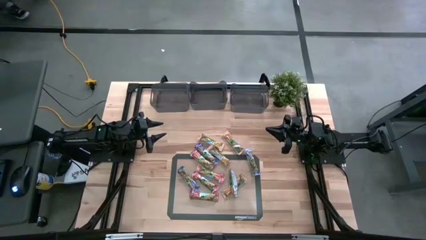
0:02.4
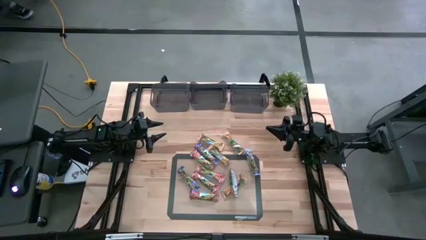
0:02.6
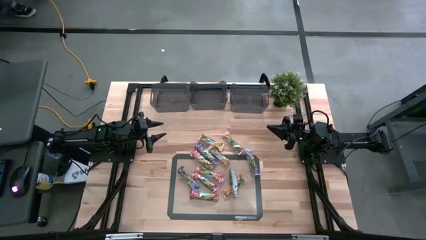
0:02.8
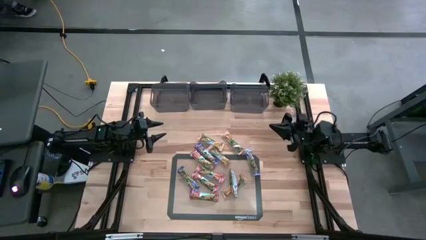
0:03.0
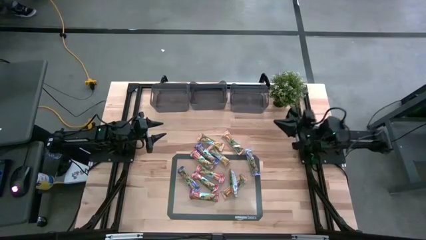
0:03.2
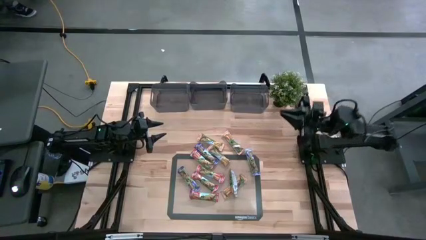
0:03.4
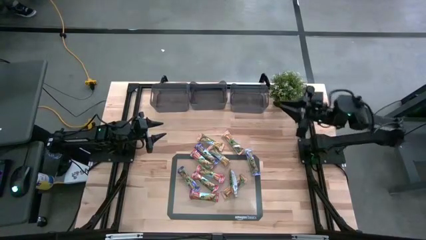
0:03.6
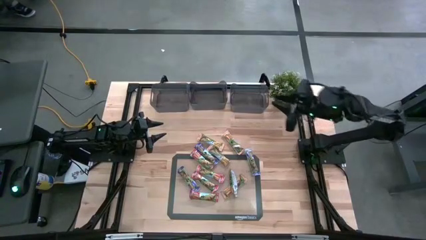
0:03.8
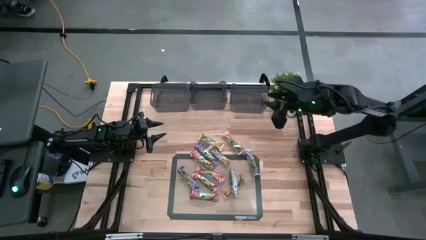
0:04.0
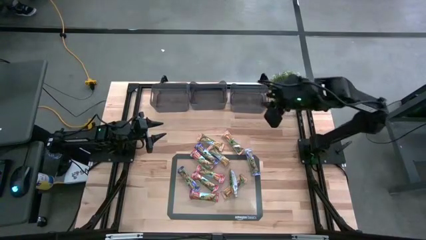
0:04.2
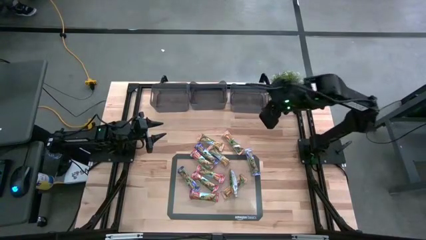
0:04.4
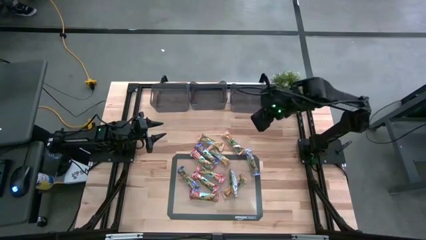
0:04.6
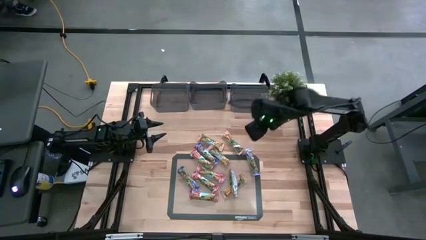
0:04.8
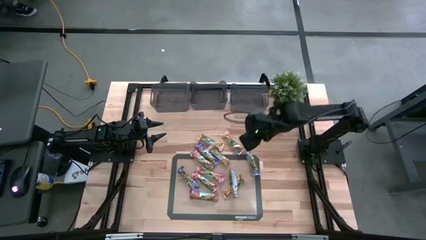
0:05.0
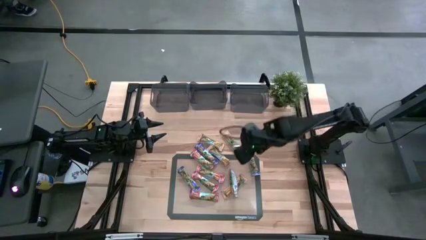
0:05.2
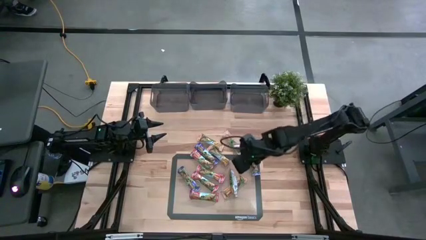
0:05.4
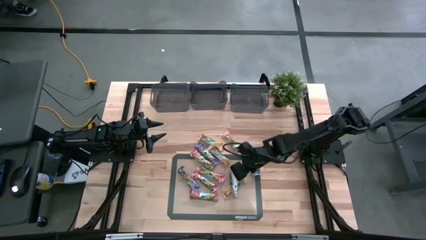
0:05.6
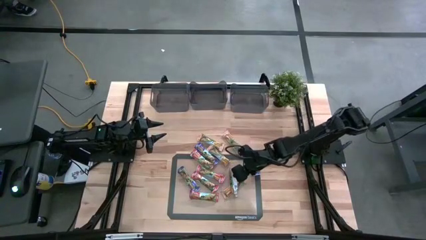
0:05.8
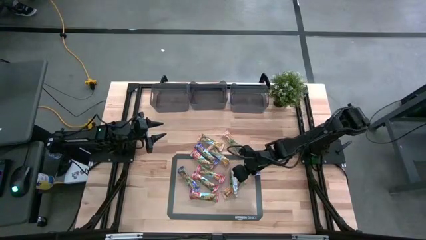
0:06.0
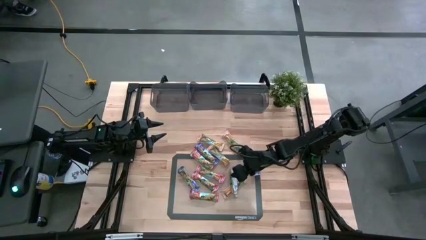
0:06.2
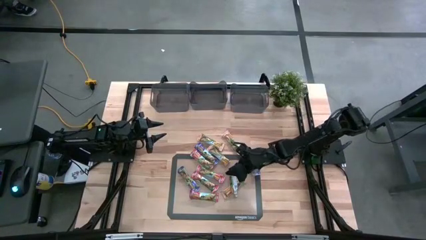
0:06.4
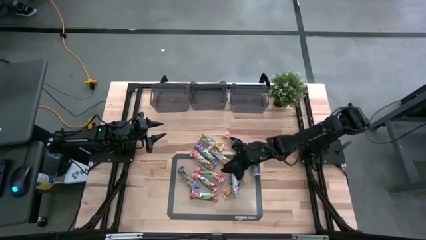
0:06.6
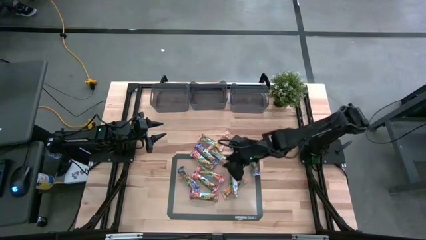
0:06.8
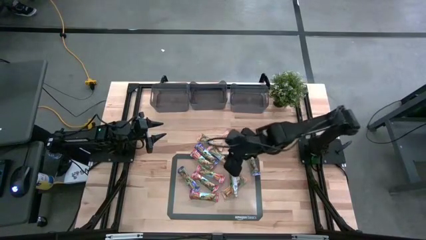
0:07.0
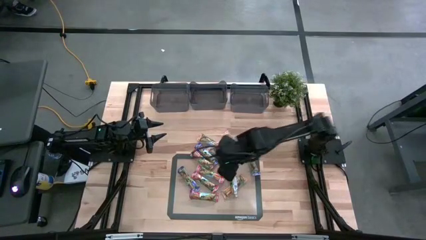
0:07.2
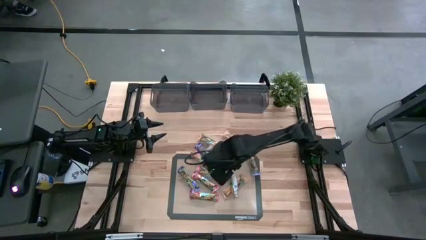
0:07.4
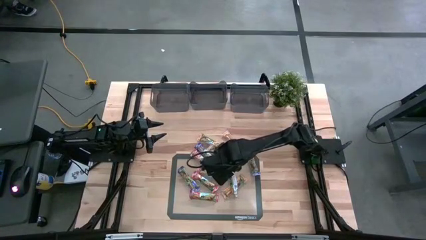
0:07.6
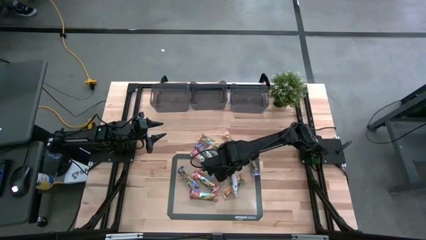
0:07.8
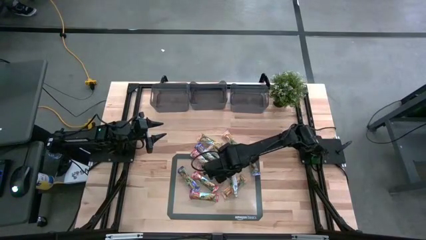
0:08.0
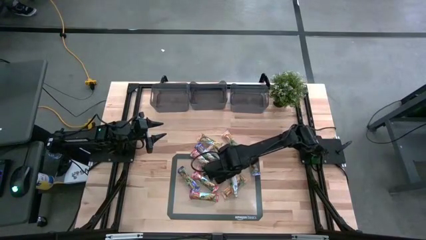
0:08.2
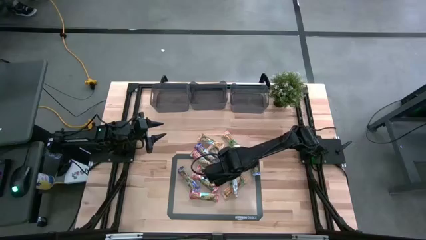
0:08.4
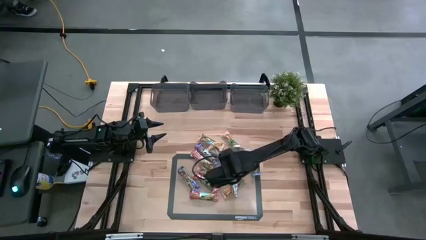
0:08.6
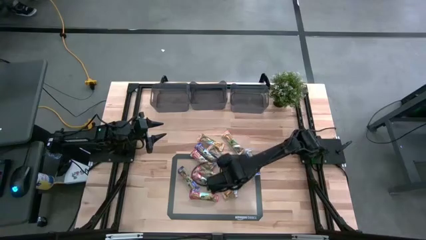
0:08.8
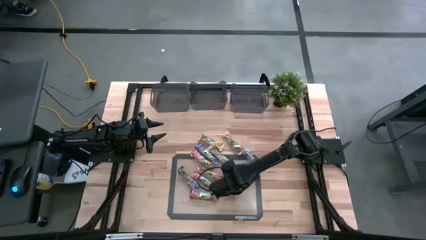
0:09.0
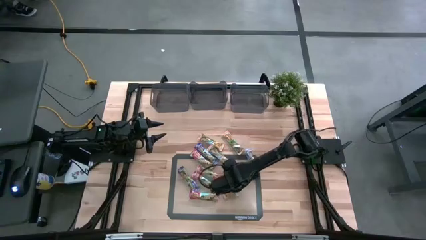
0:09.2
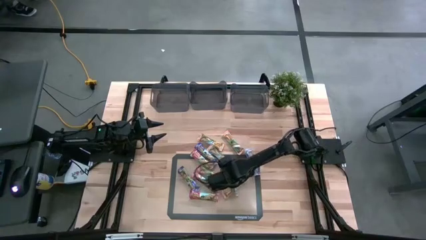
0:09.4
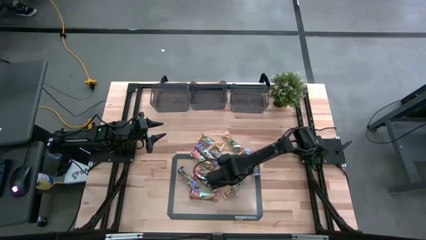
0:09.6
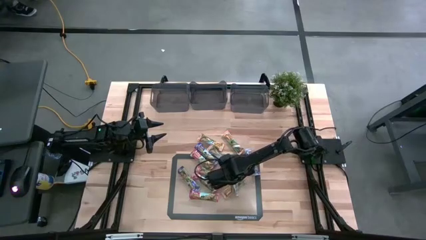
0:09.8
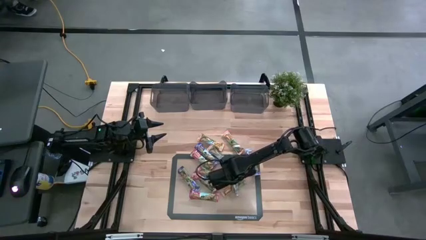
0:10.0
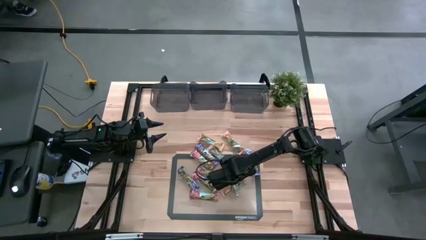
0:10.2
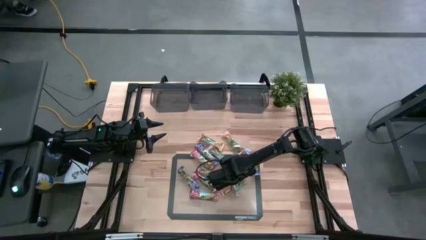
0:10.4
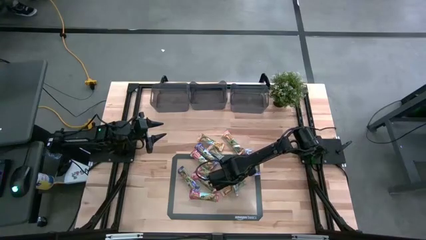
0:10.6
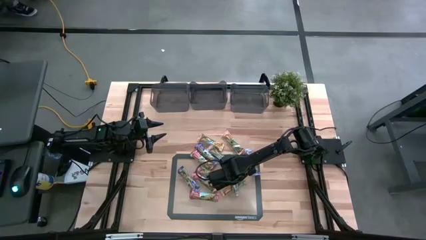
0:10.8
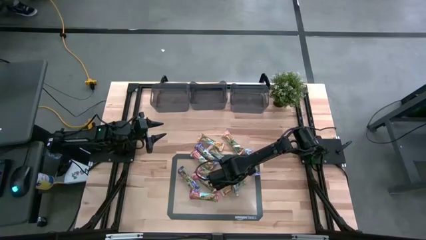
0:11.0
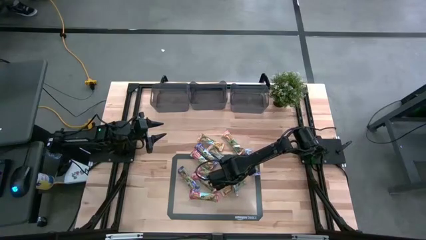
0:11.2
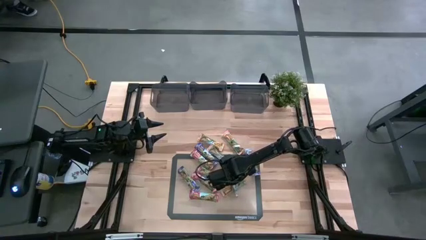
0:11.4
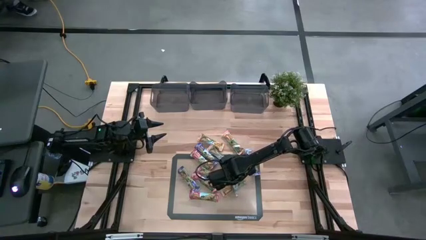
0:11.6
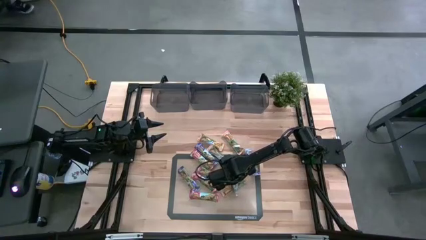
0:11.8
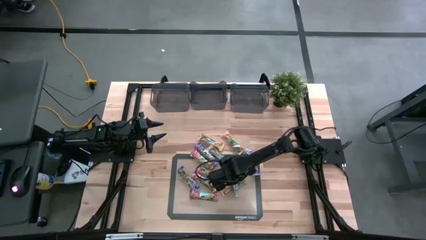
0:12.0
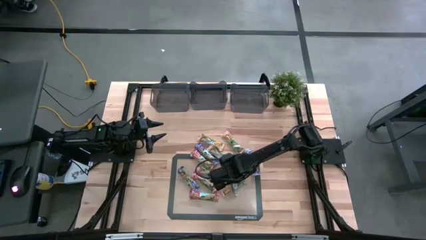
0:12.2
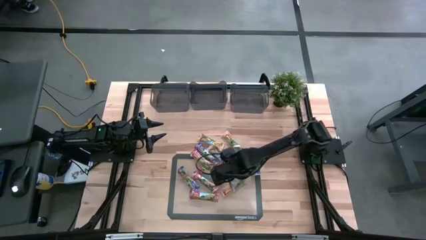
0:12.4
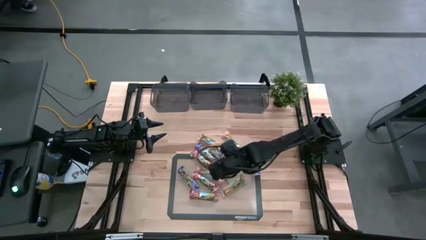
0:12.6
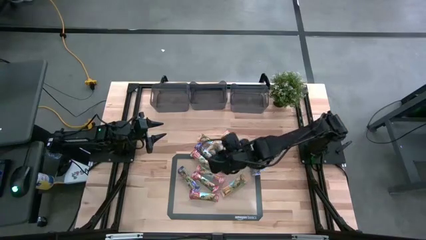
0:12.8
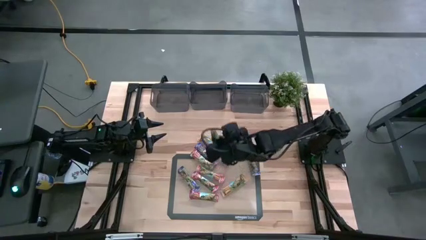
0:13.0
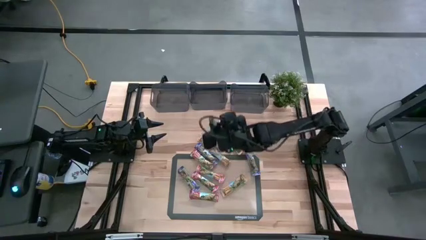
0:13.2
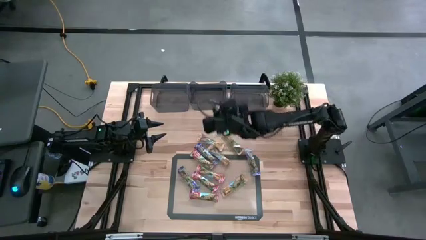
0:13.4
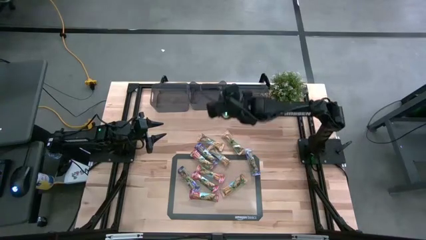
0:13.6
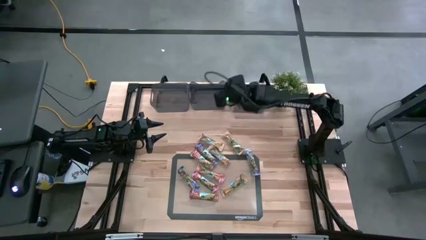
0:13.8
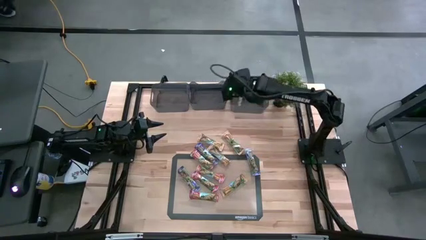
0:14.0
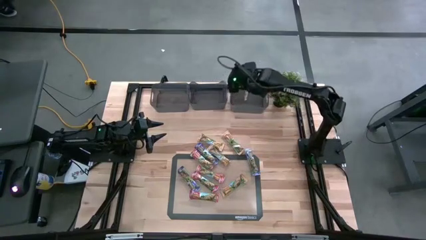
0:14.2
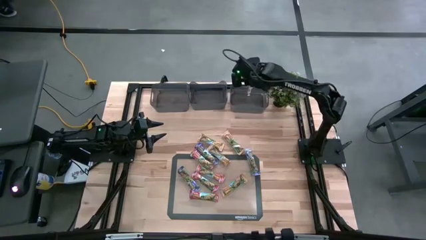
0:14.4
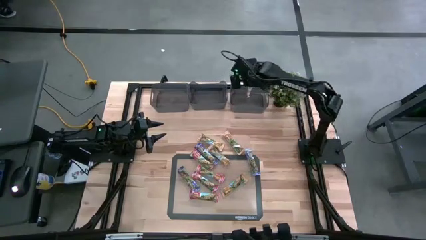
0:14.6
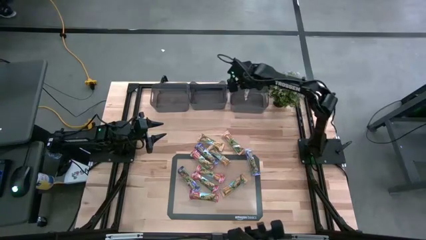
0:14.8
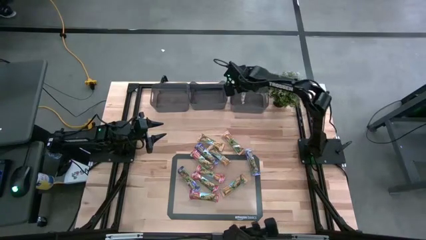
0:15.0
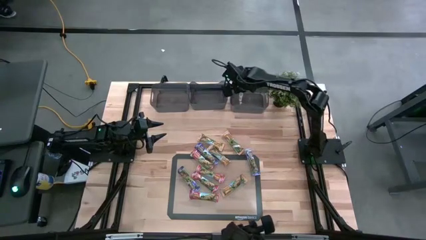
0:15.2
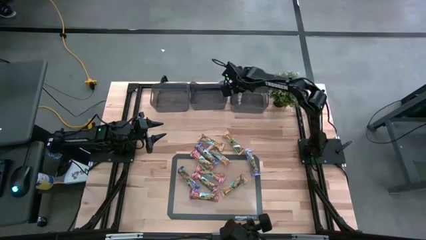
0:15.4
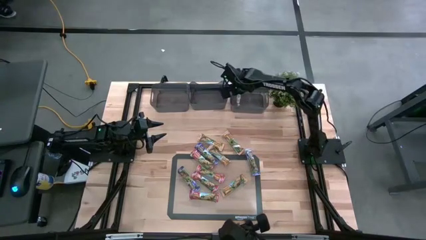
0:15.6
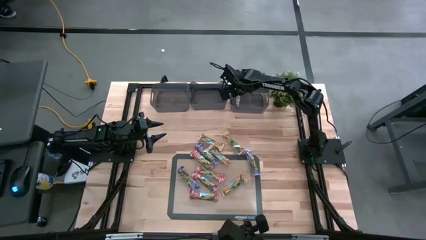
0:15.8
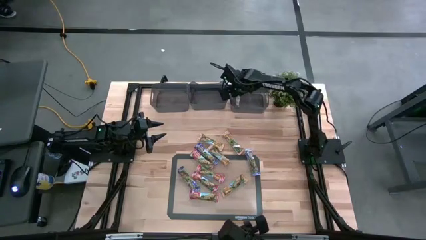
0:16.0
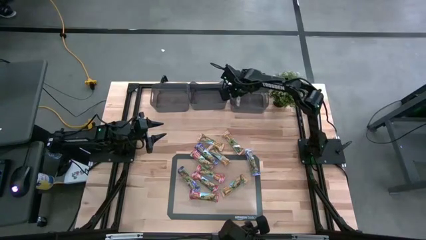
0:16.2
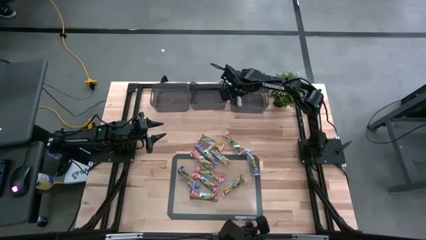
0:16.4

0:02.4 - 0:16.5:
Task: Pick and place Granola Bars by type
Put the yellow granola bar into the right black bin

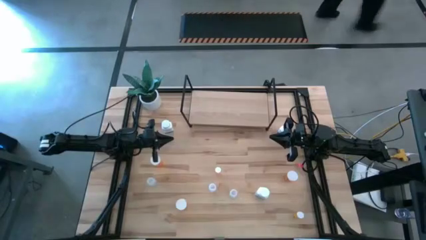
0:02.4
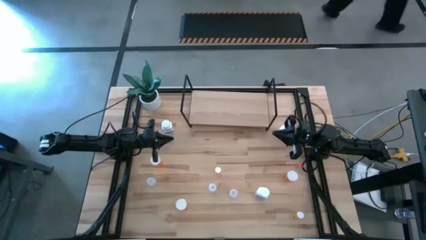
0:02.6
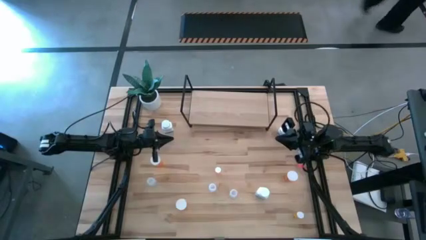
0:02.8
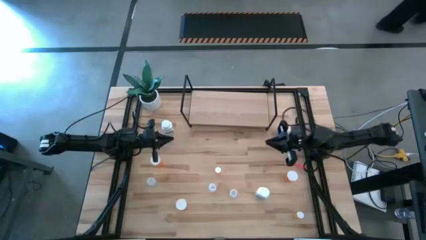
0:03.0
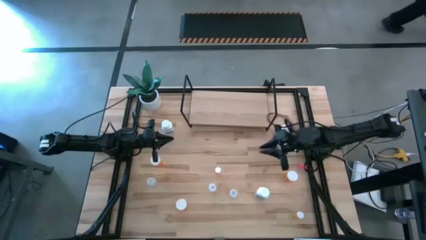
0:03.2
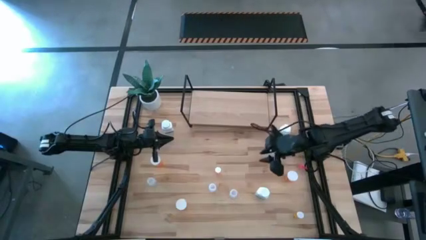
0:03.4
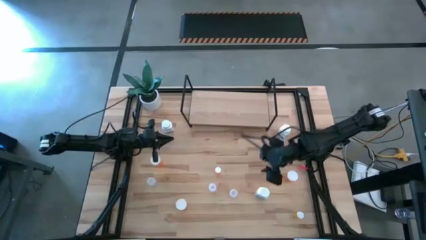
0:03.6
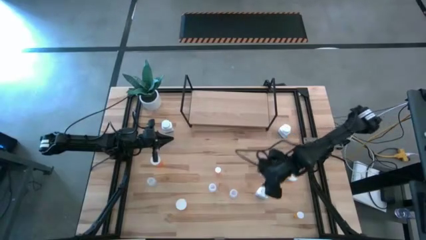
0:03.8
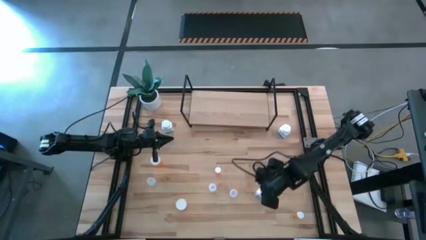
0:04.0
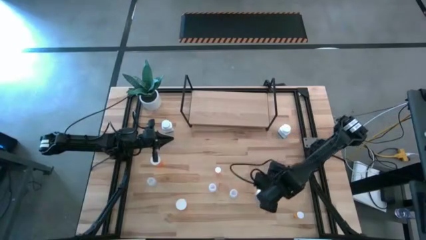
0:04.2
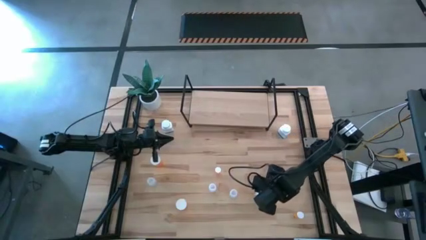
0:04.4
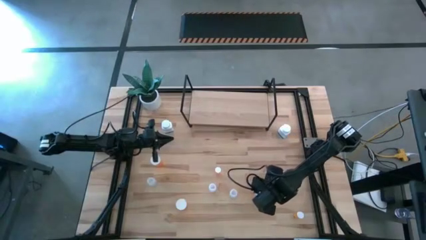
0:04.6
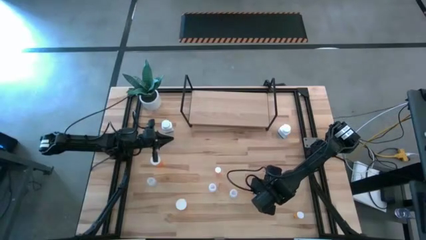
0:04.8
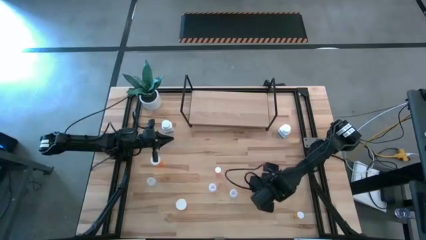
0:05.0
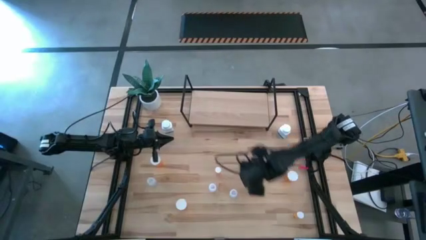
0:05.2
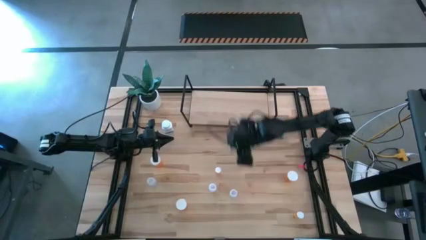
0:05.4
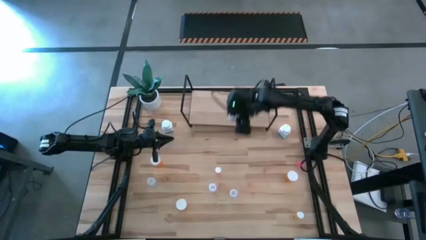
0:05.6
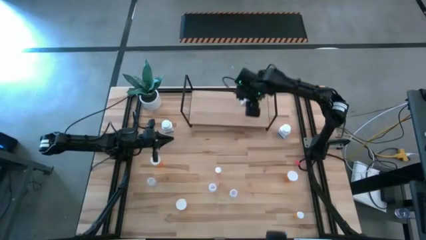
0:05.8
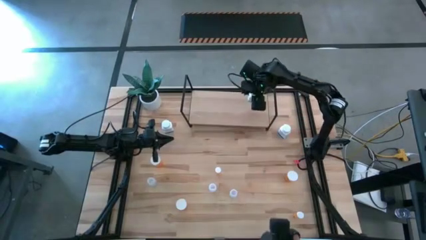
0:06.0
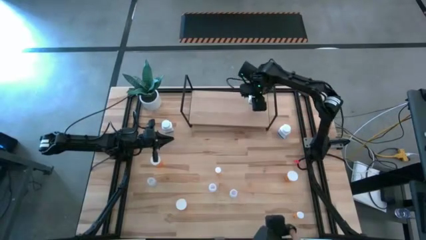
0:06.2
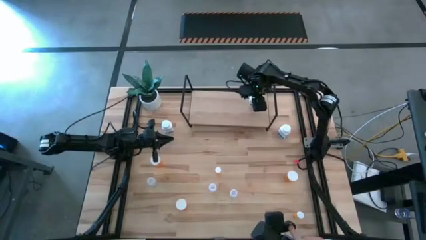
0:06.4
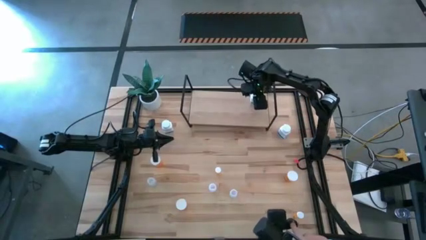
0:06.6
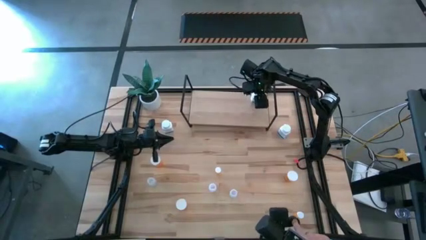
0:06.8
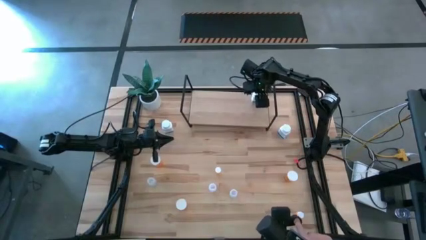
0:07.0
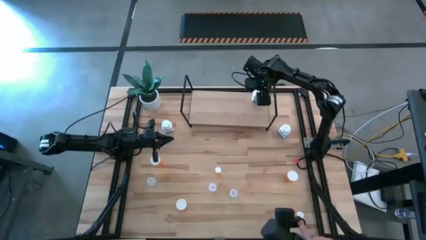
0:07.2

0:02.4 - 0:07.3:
Task: Pick and place medicine bottles onto shelf by color
Put the bottom white medicine bottle on the shelf
